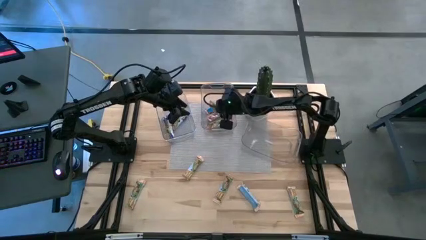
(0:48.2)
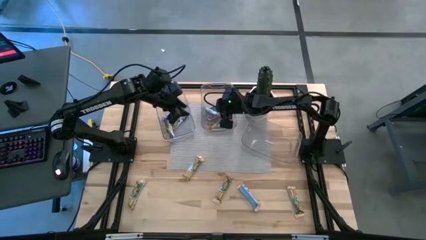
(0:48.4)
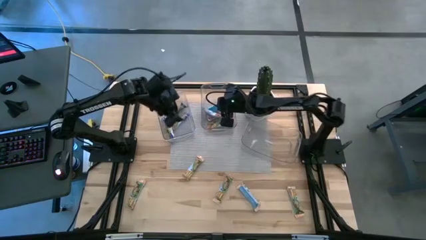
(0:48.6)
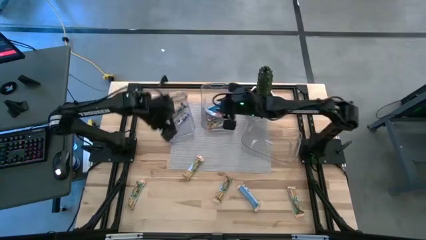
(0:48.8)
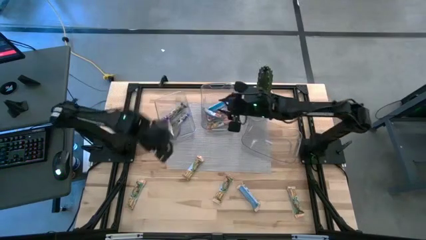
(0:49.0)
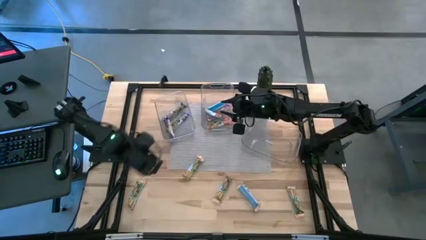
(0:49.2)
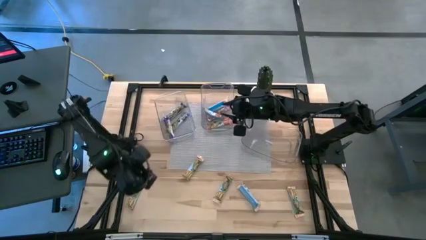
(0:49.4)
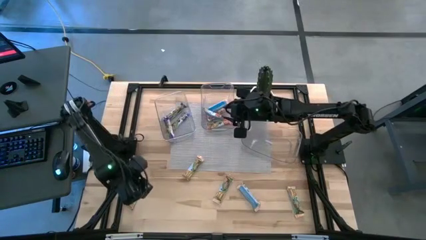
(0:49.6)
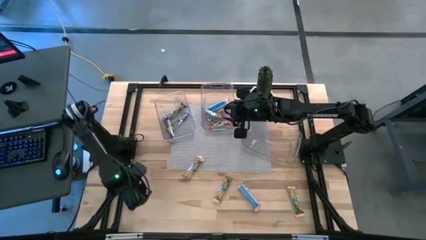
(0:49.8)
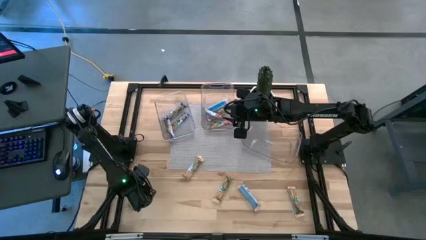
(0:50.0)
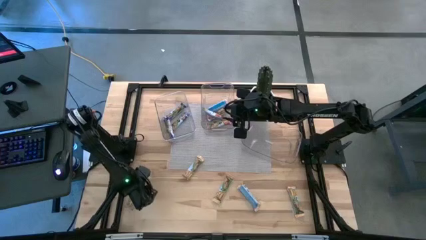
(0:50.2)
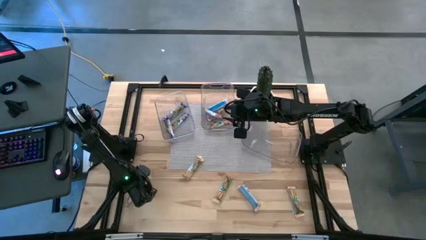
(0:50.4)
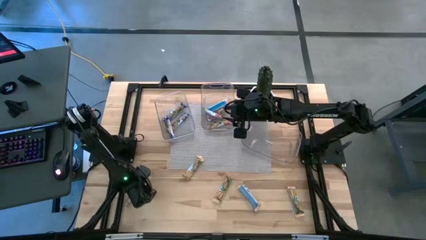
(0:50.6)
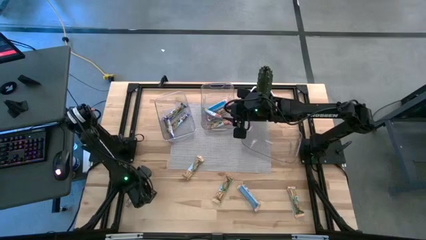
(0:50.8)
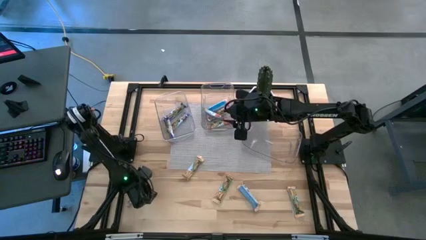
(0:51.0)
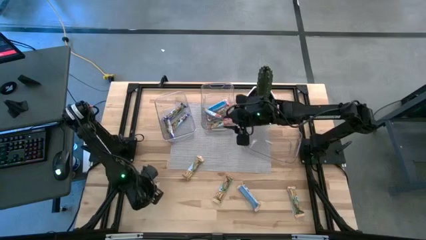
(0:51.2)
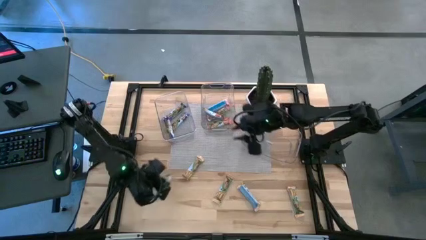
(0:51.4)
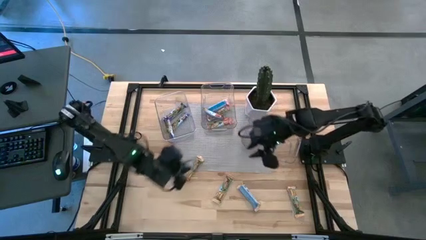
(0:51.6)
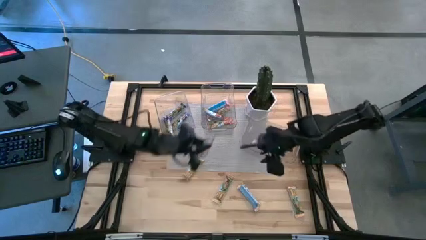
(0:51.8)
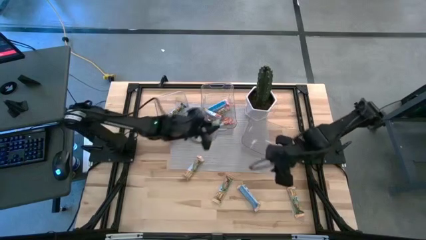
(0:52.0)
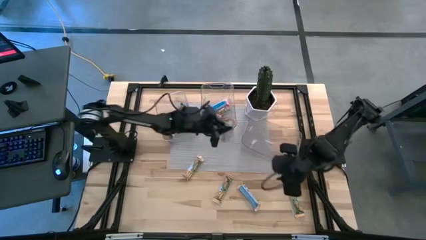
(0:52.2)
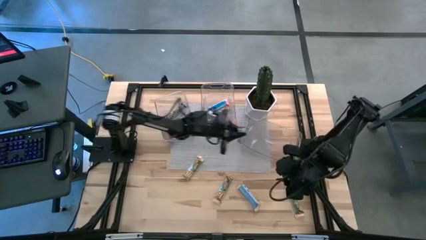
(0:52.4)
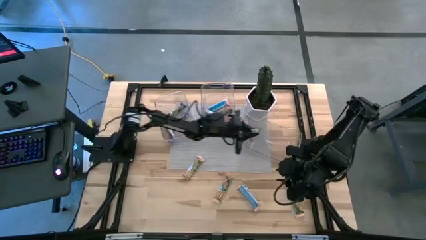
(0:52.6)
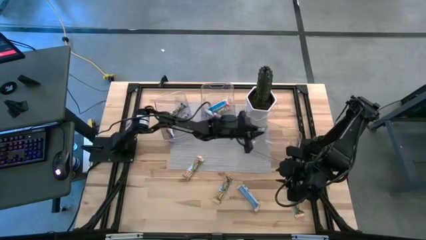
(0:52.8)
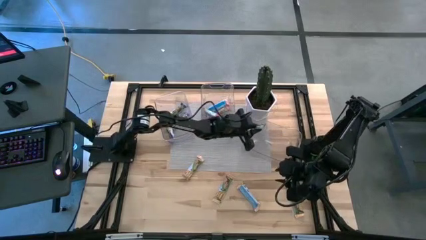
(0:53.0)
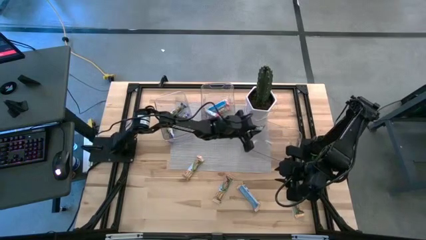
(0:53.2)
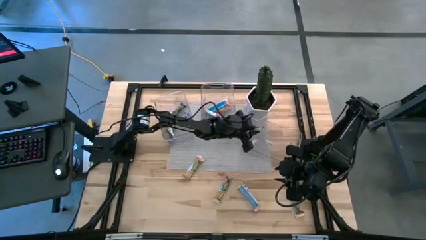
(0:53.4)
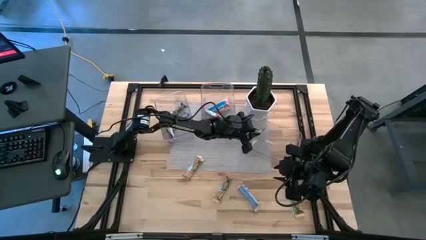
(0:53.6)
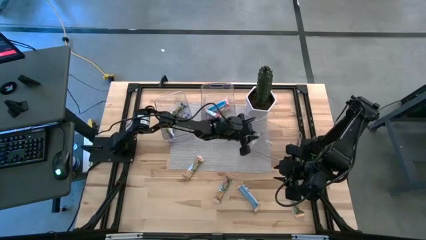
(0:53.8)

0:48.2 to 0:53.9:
Task: Pick and place Granola Bars by type
Put the yellow granola bar into the right bin

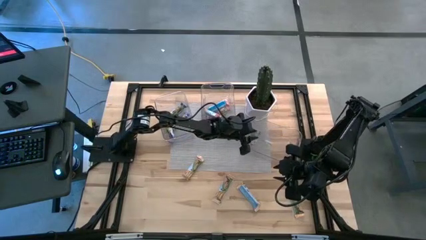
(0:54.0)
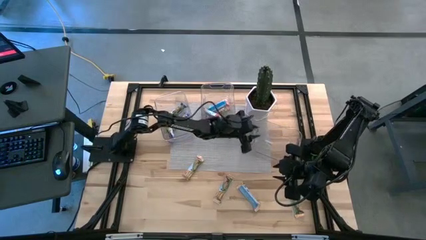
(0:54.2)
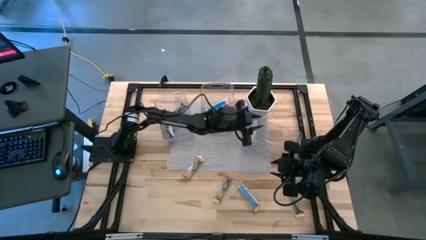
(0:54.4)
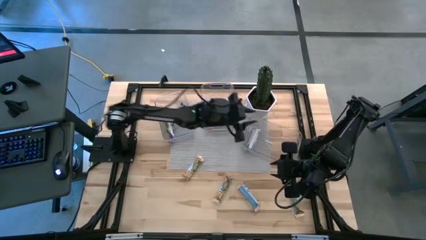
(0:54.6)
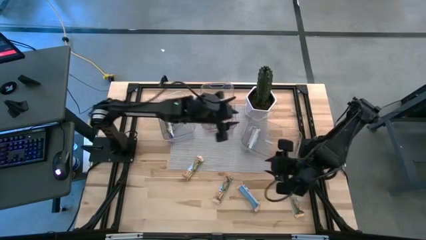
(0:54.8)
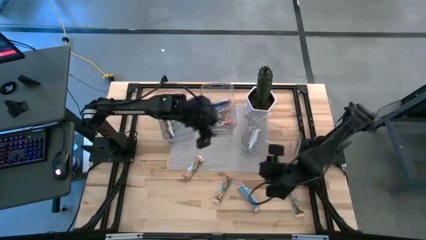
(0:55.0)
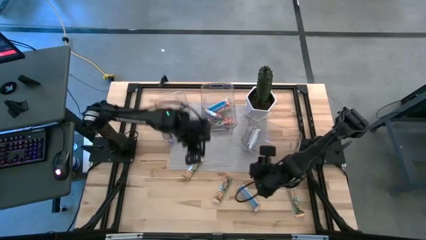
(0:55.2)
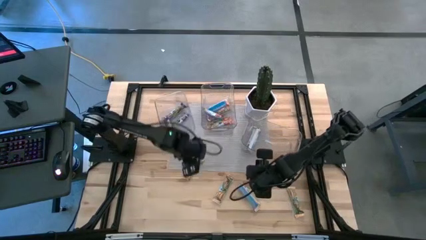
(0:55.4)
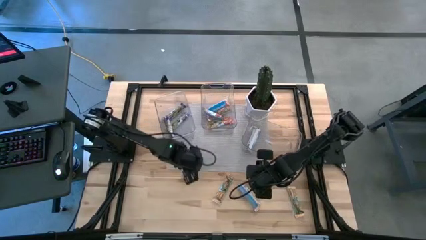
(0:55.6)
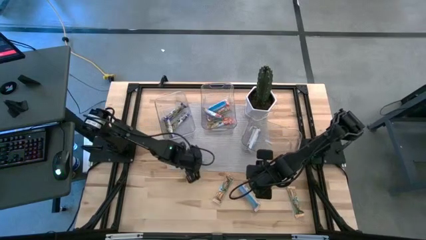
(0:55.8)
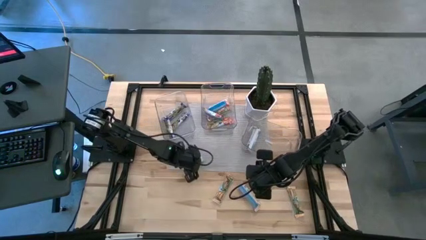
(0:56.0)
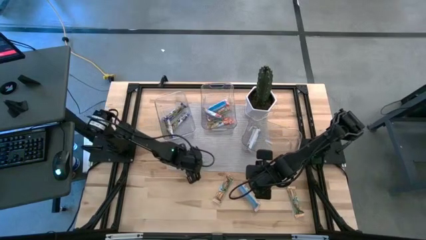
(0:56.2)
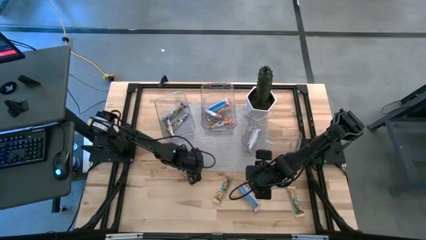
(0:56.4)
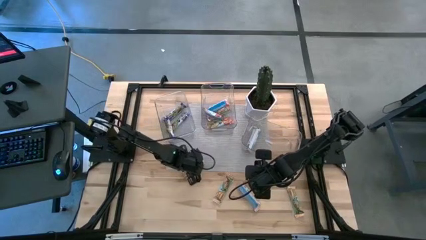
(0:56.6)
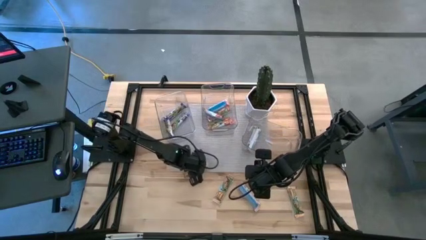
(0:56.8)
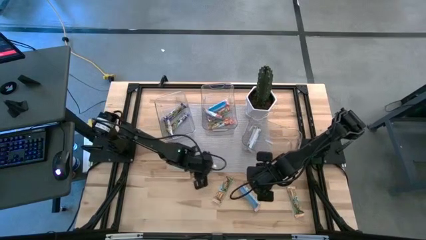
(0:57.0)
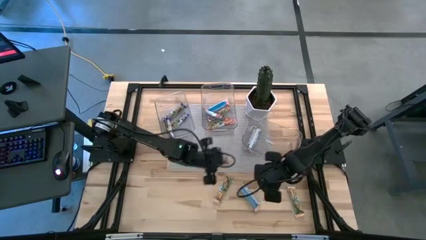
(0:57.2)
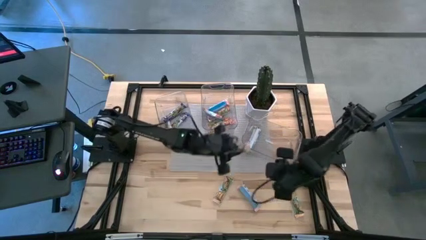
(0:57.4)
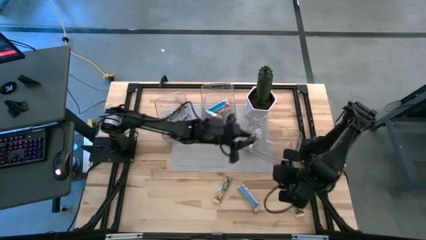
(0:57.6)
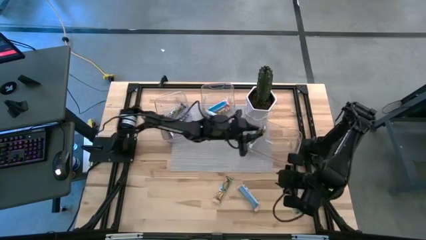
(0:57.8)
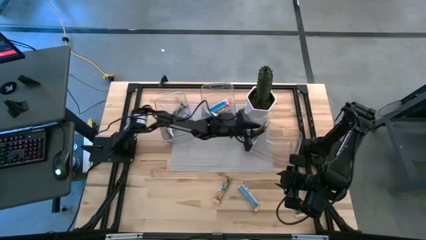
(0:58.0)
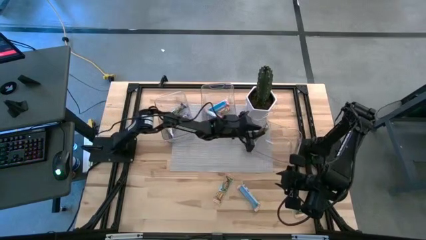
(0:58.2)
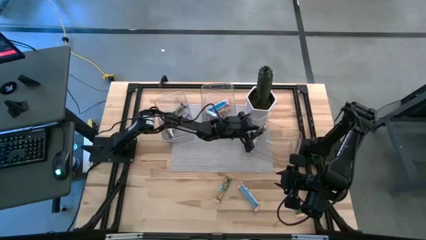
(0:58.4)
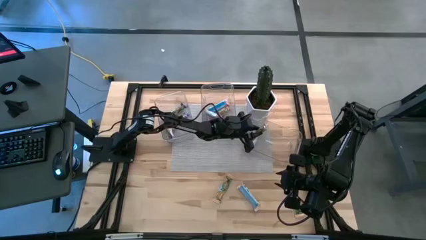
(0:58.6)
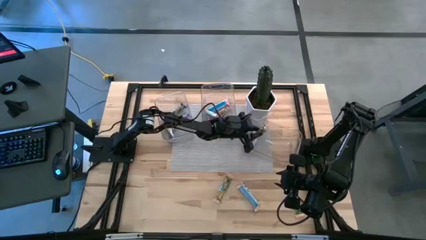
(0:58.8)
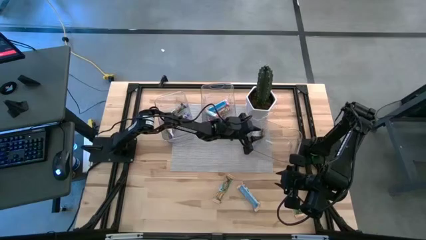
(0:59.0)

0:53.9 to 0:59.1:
Put the yellow granola bar into the right bin

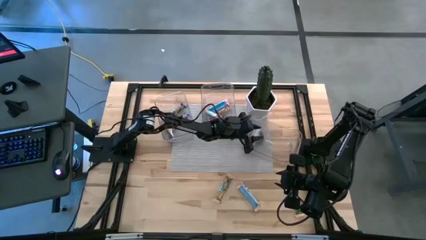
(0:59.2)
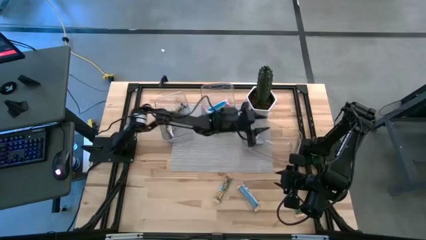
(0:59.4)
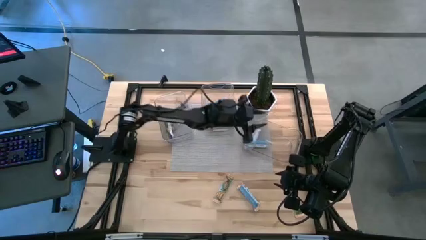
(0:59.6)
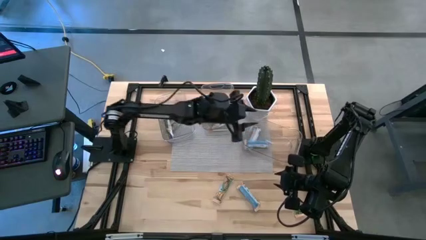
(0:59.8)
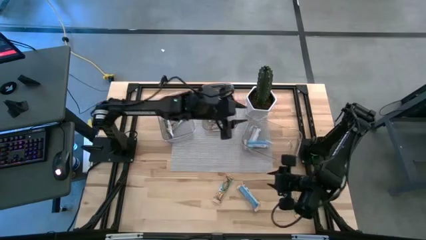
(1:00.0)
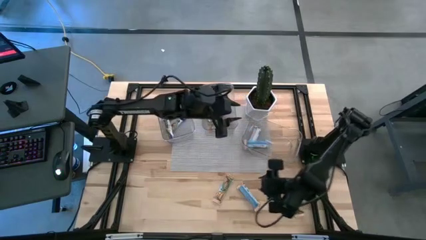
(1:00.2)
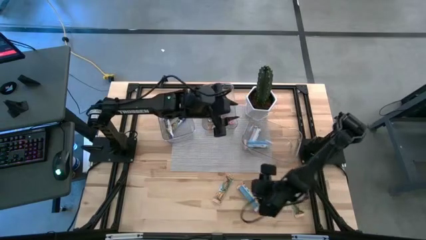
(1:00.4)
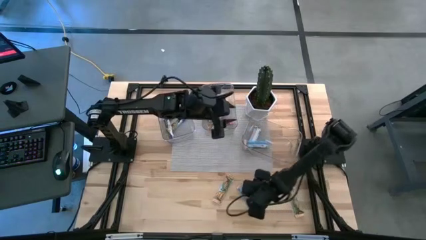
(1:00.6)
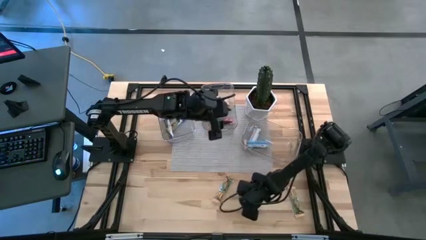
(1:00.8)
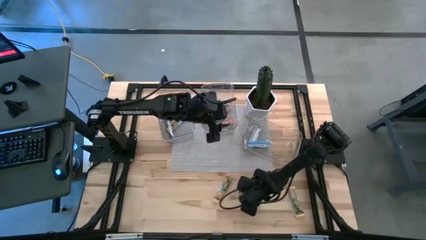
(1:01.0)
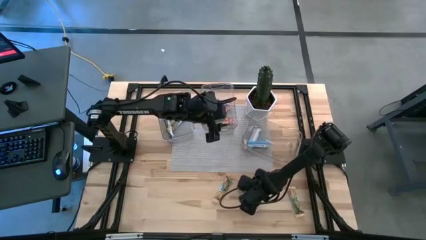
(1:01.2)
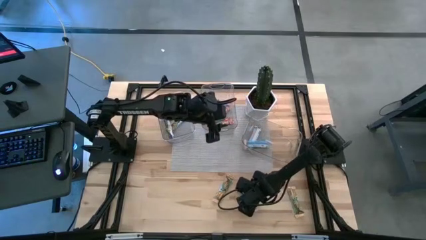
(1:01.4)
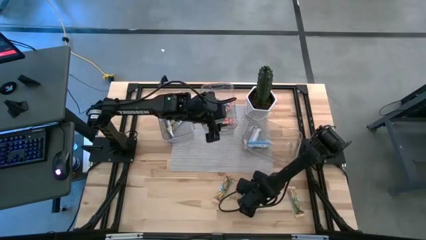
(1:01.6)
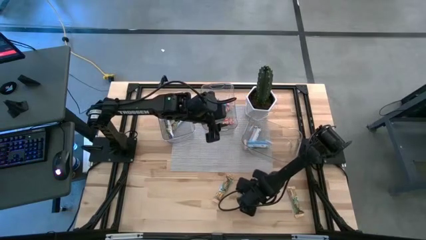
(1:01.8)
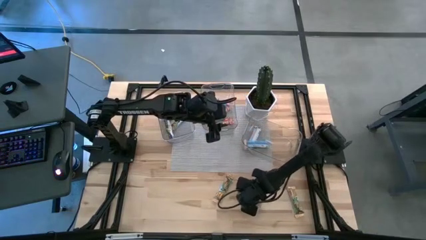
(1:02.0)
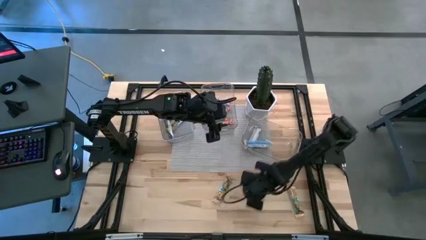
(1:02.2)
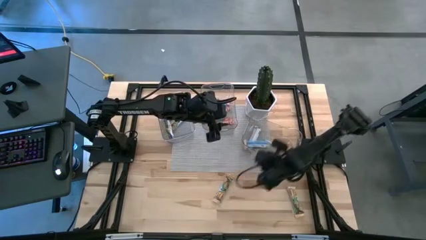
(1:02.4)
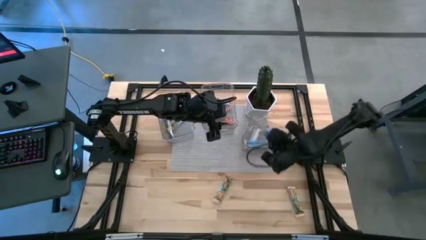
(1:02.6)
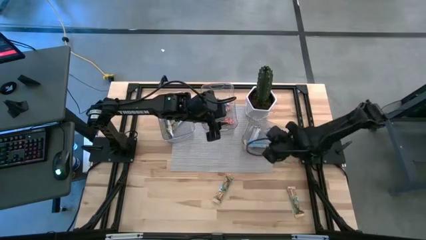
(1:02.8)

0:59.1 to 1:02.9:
Put the yellow granola bar into the right bin

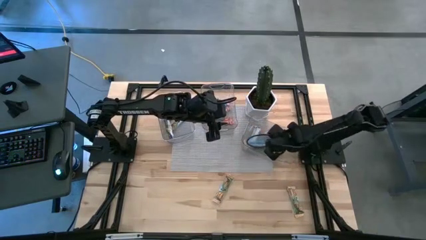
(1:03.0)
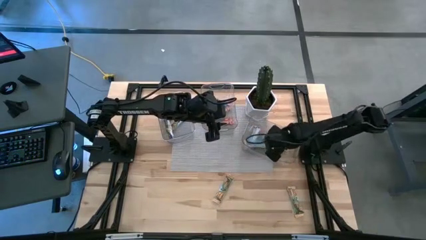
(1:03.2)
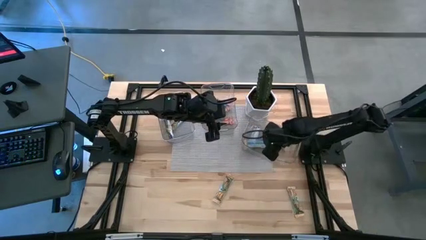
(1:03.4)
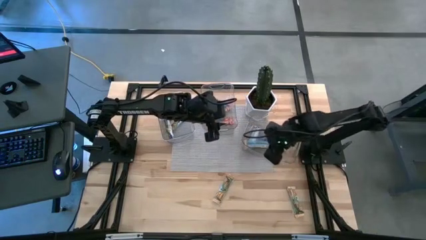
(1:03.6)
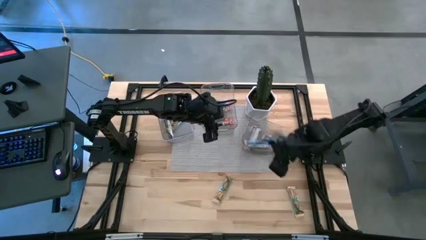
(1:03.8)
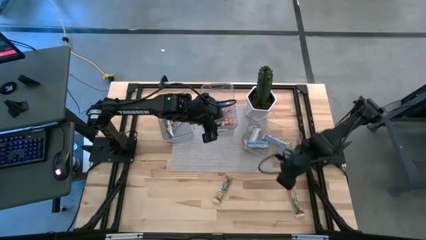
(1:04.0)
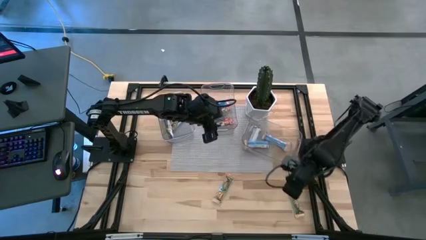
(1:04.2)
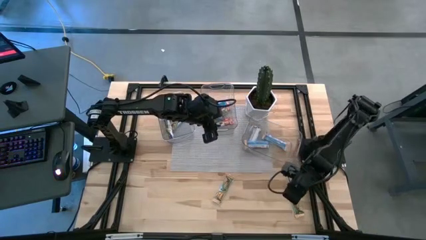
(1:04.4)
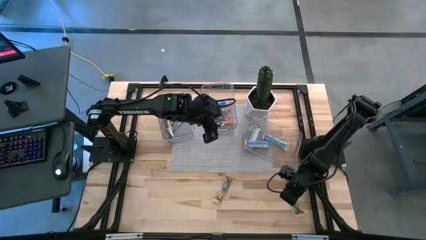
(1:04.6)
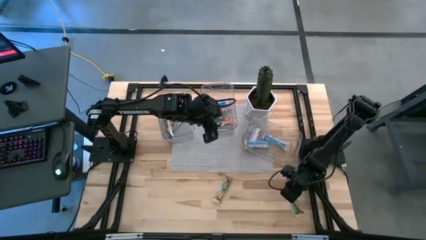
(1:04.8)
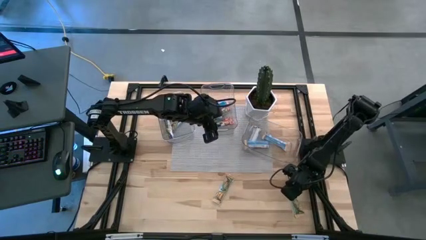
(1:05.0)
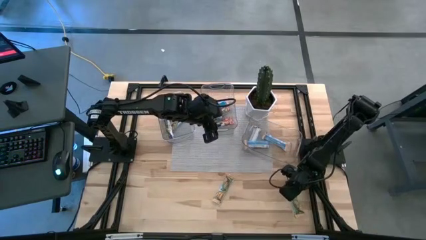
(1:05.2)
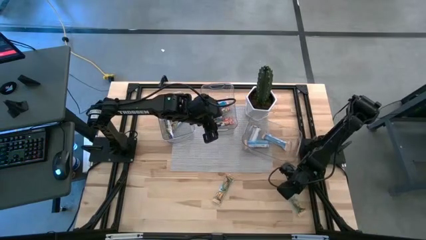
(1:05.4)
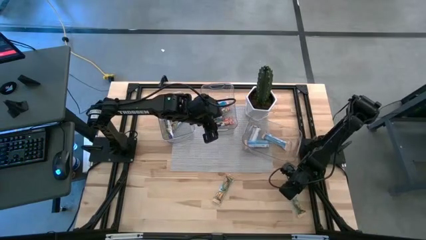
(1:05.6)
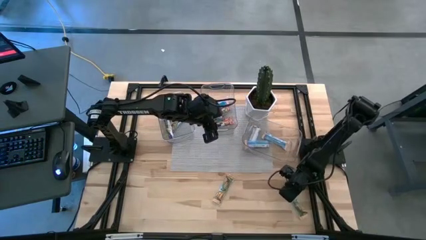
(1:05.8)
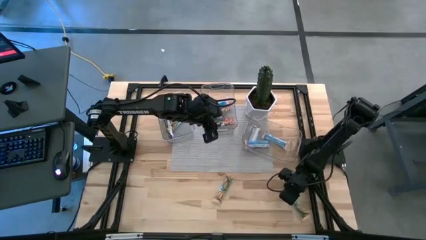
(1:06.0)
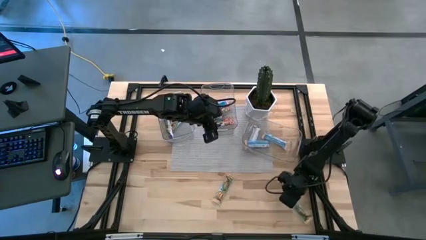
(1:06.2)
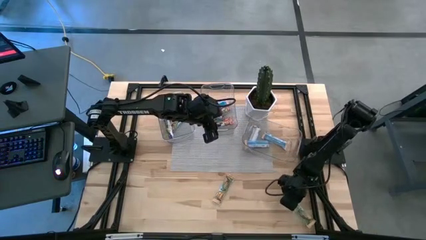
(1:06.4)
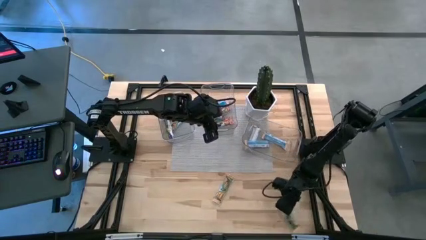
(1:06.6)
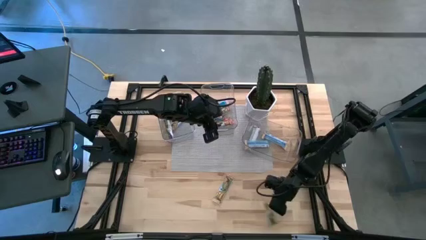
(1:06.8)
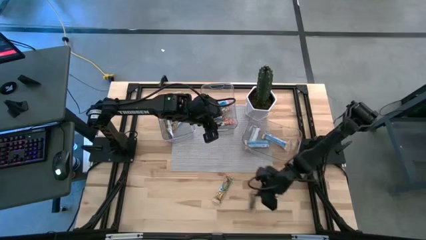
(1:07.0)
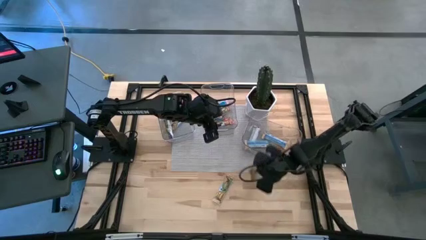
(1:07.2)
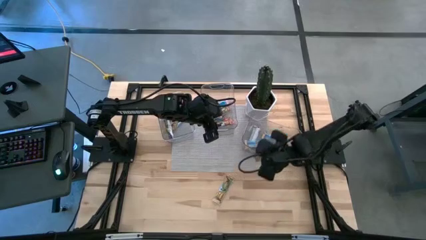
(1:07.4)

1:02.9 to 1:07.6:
Put the yellow granola bar into the right bin
